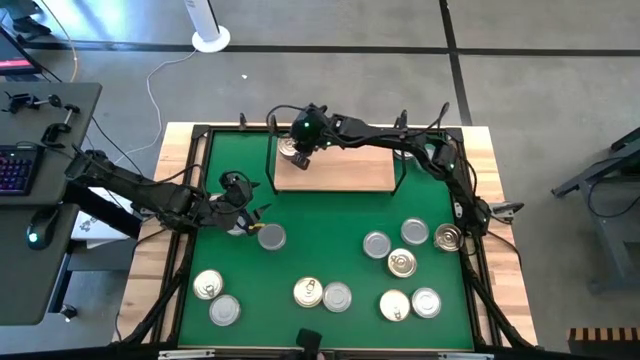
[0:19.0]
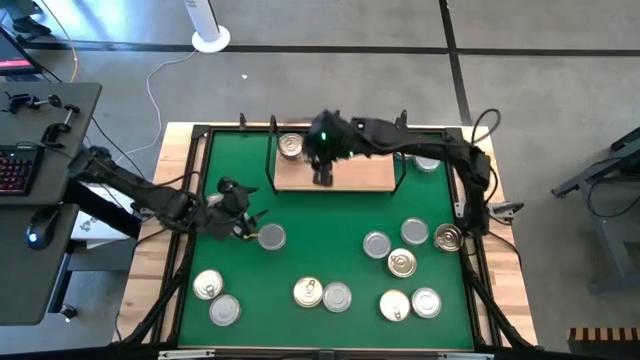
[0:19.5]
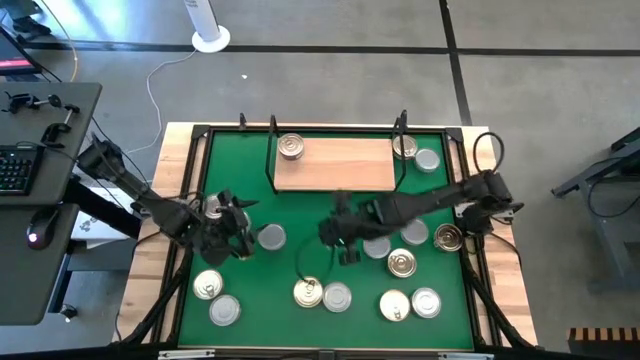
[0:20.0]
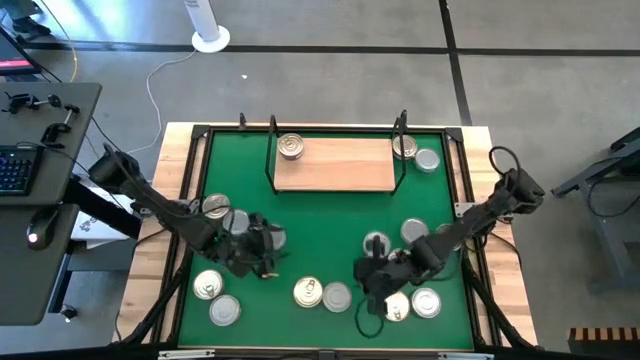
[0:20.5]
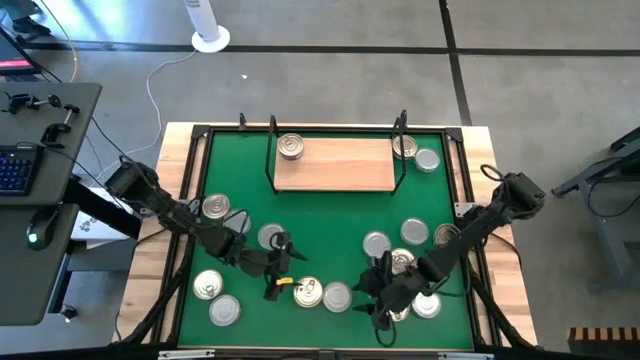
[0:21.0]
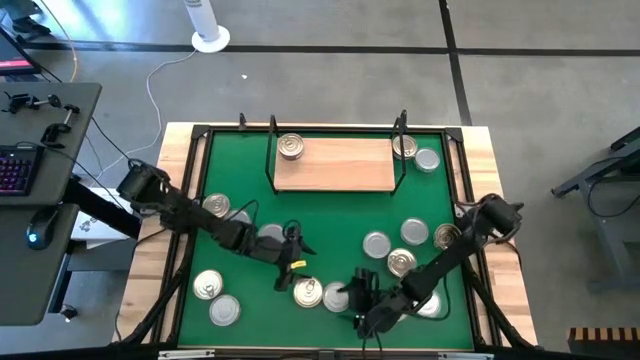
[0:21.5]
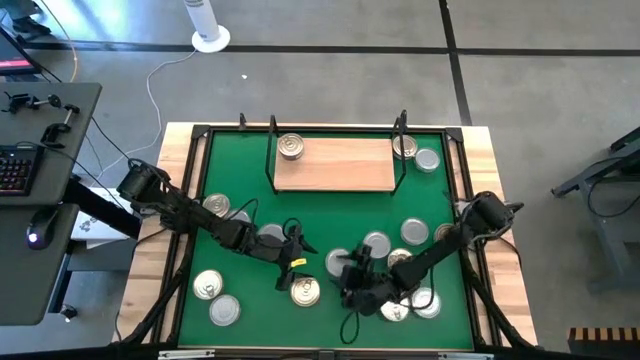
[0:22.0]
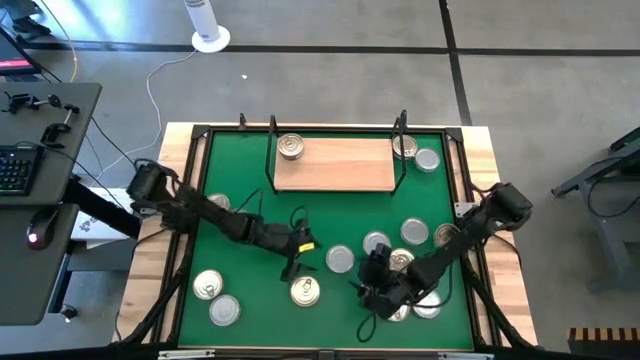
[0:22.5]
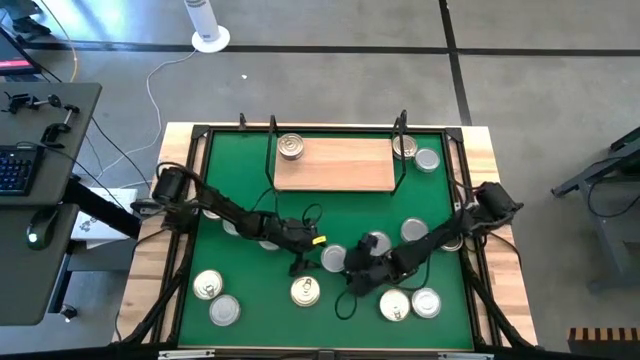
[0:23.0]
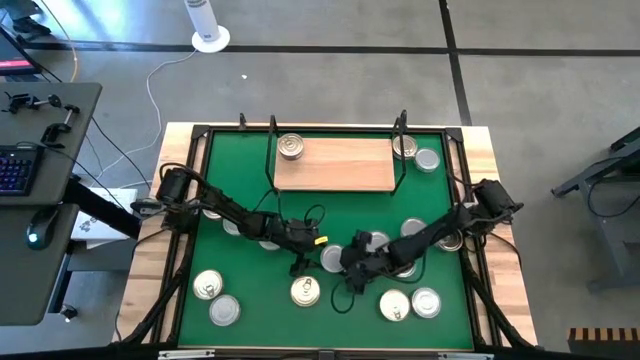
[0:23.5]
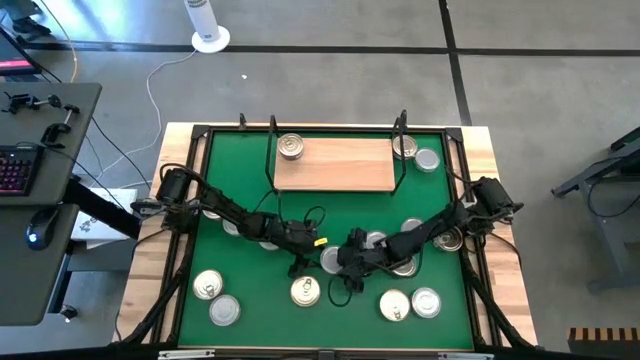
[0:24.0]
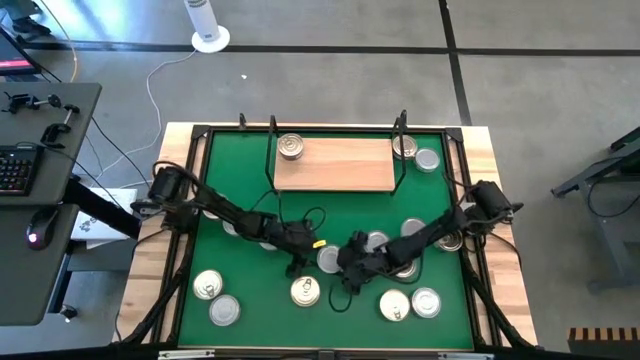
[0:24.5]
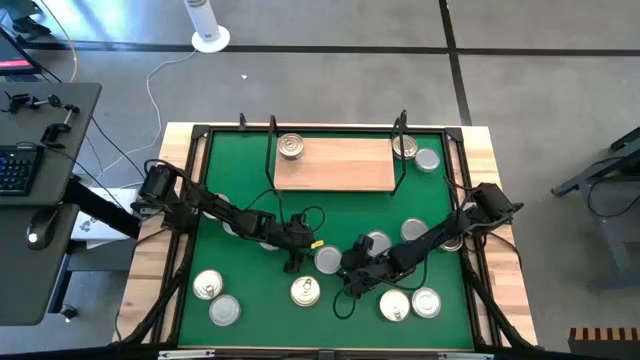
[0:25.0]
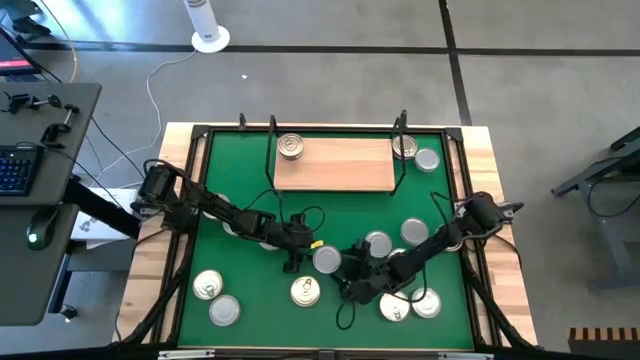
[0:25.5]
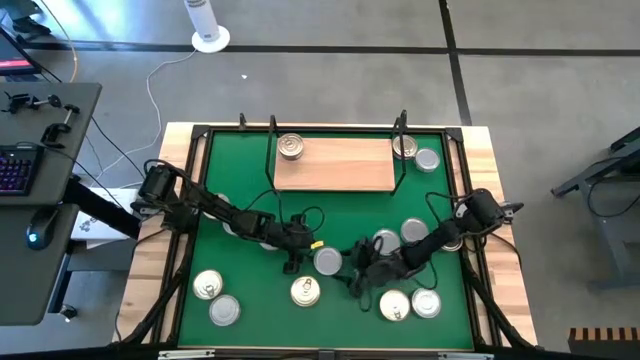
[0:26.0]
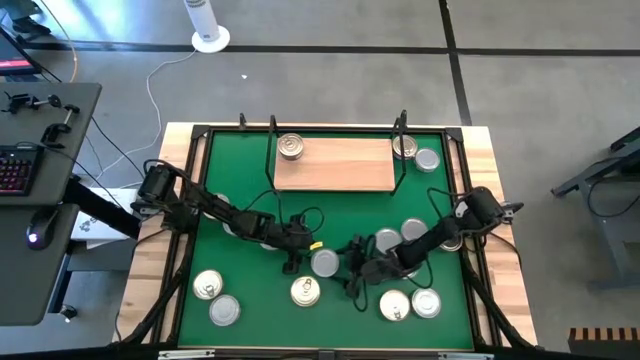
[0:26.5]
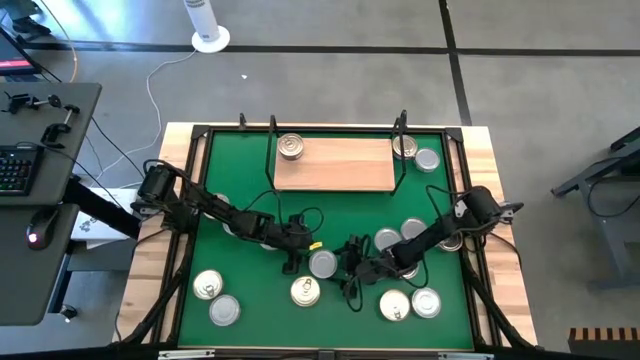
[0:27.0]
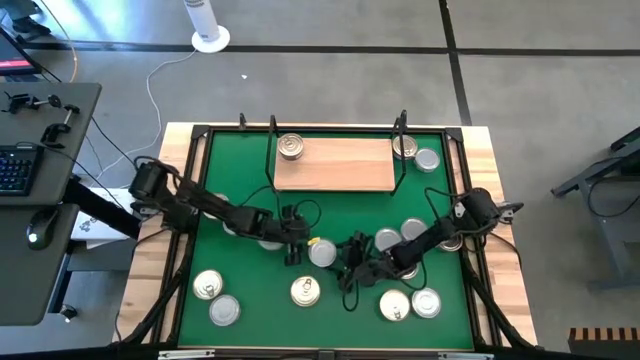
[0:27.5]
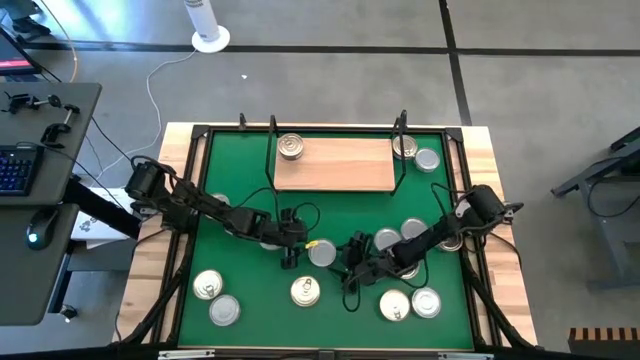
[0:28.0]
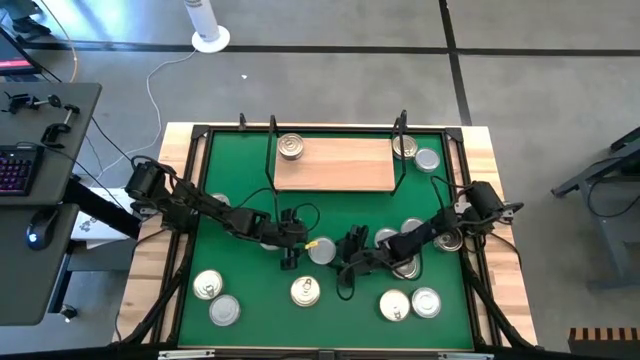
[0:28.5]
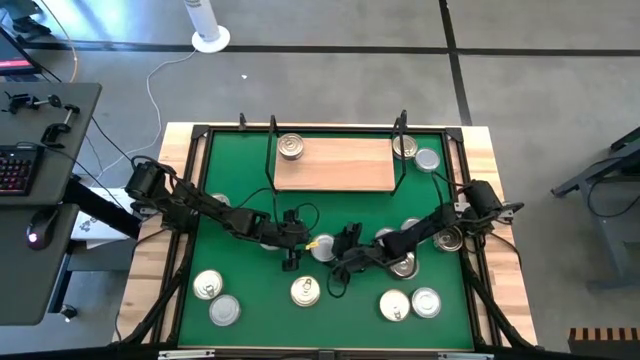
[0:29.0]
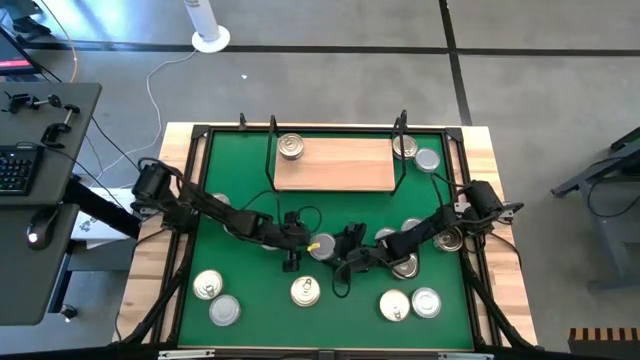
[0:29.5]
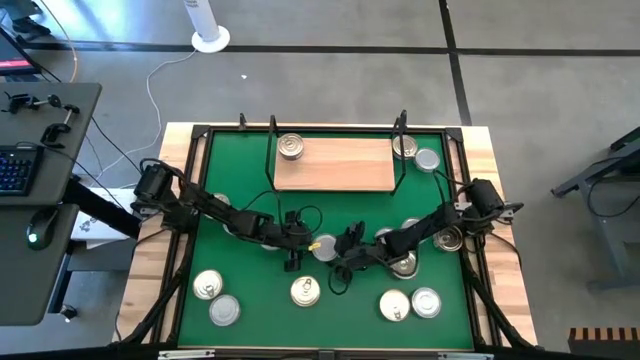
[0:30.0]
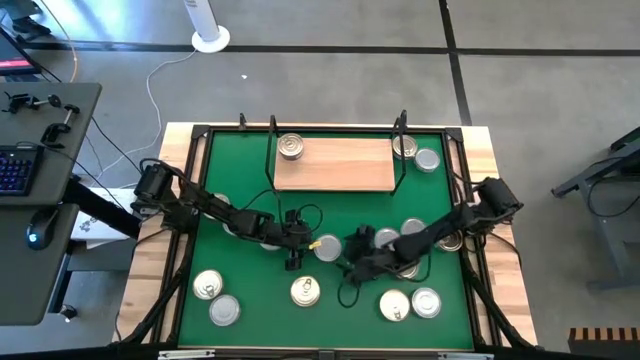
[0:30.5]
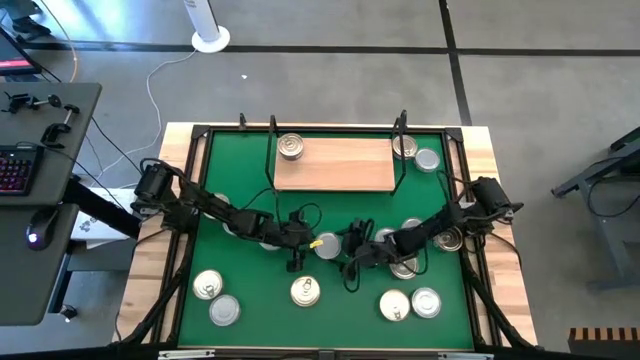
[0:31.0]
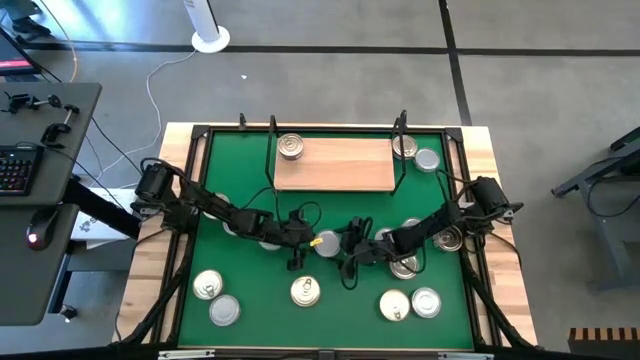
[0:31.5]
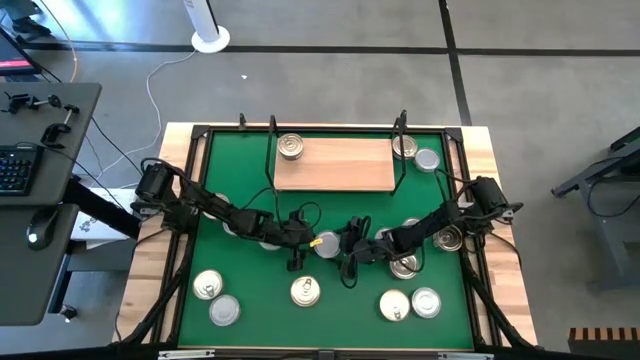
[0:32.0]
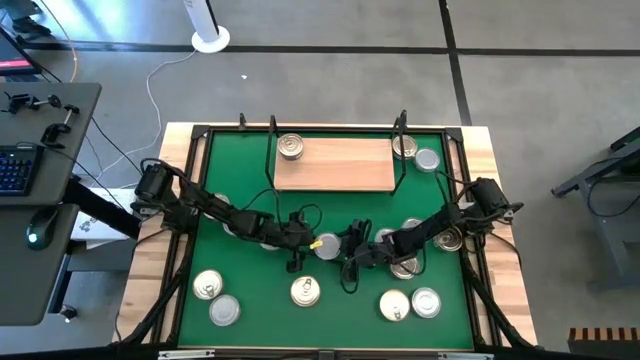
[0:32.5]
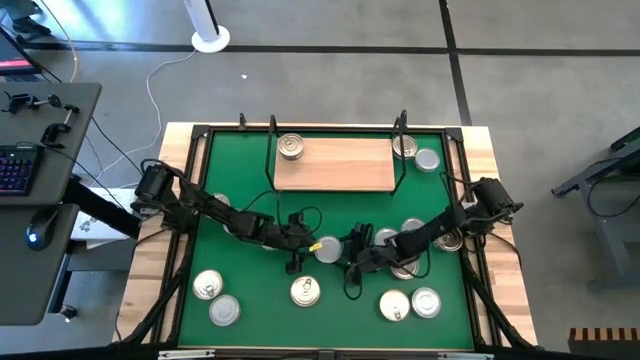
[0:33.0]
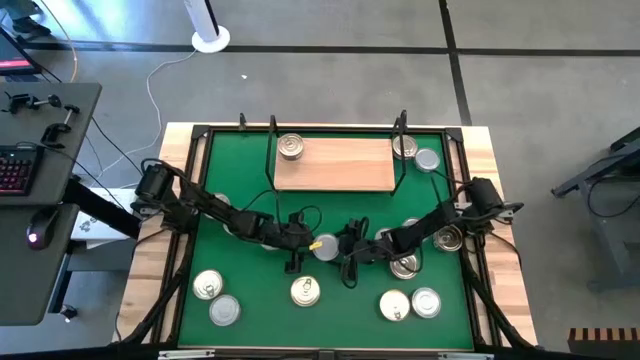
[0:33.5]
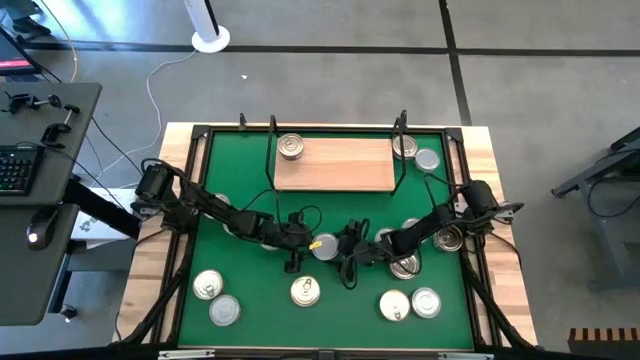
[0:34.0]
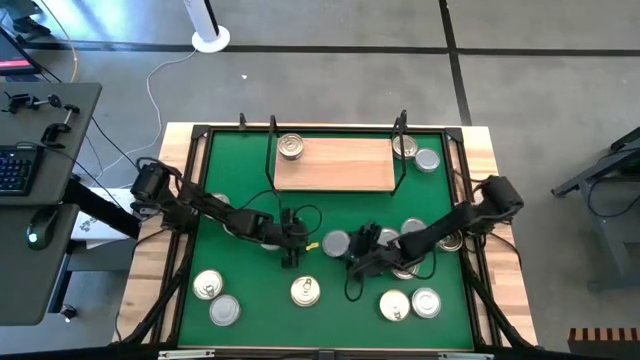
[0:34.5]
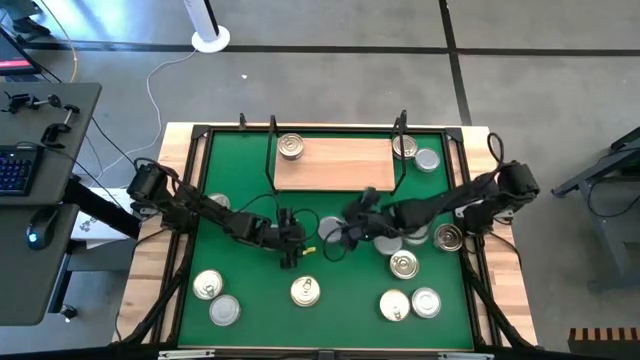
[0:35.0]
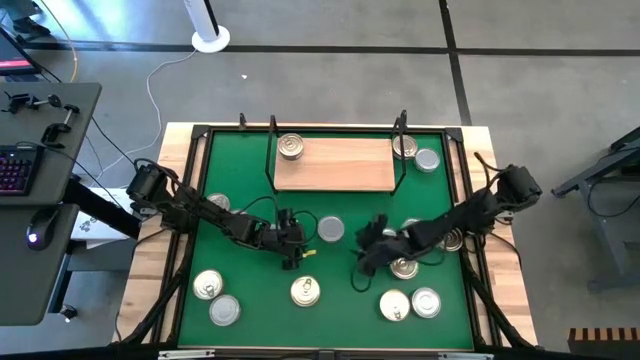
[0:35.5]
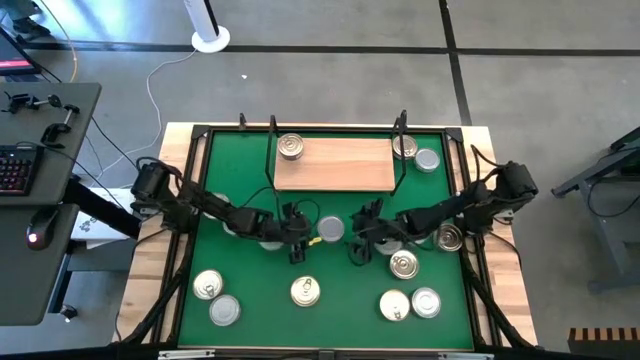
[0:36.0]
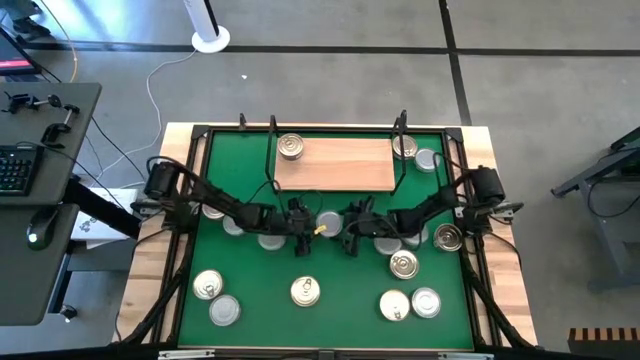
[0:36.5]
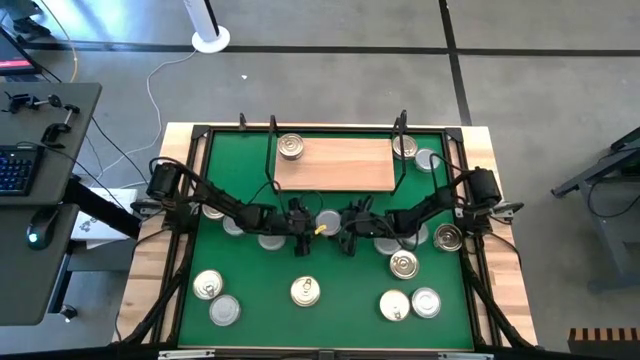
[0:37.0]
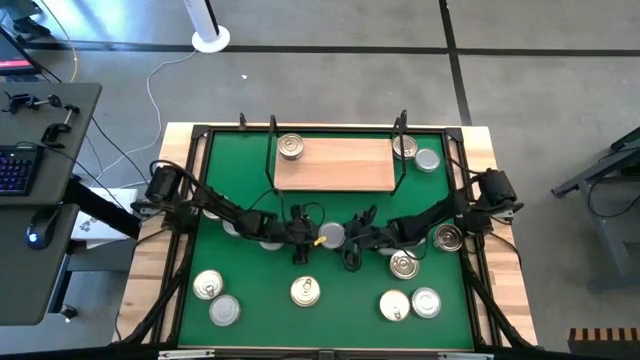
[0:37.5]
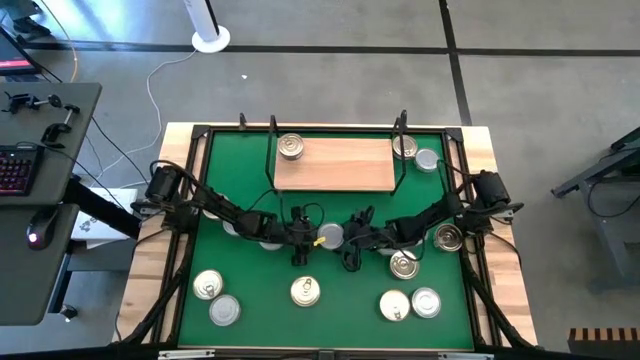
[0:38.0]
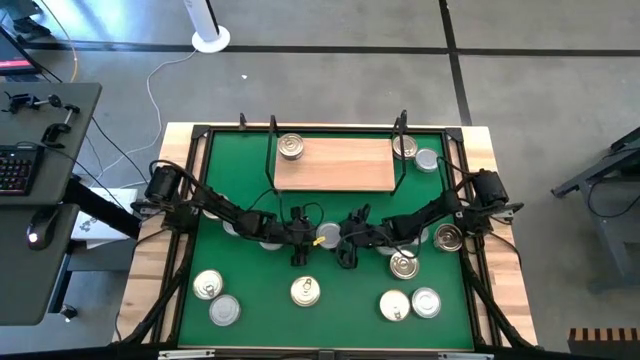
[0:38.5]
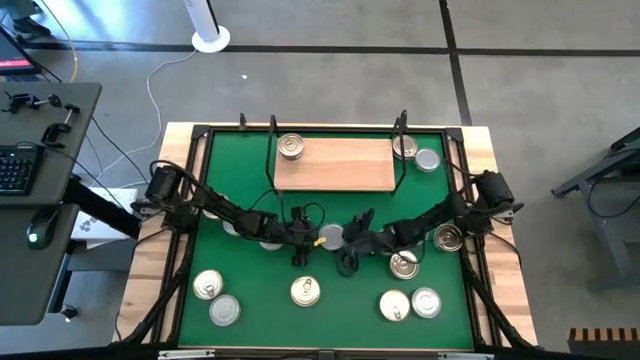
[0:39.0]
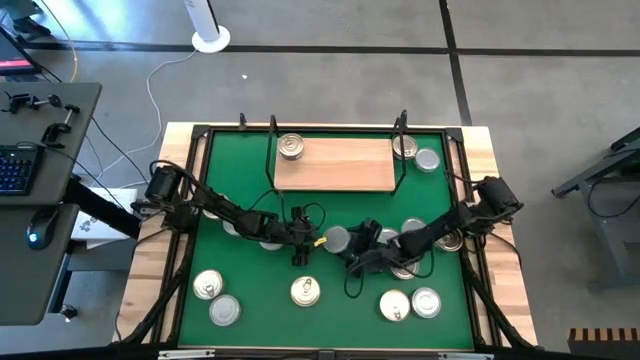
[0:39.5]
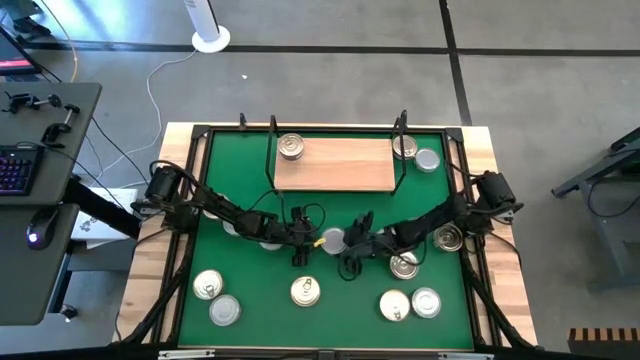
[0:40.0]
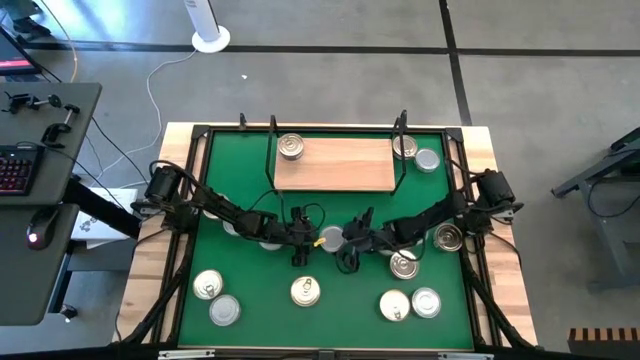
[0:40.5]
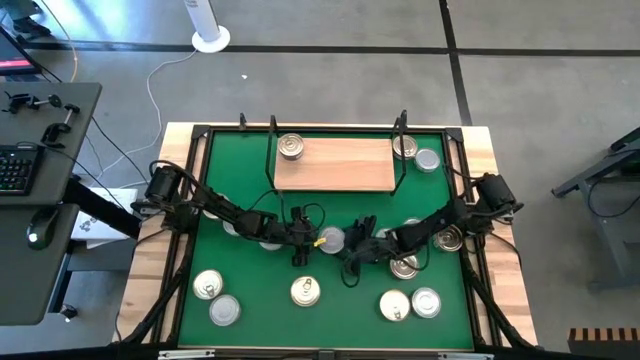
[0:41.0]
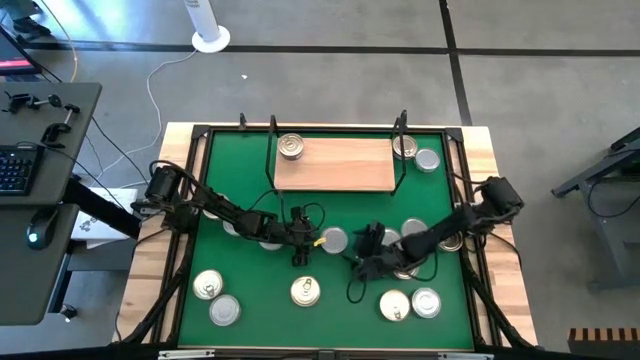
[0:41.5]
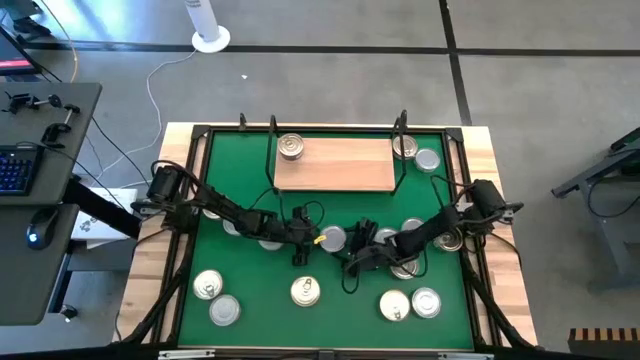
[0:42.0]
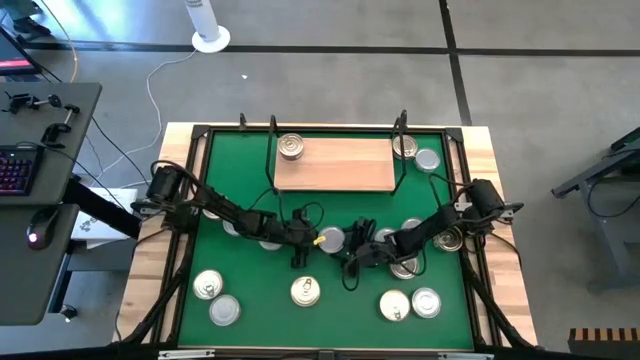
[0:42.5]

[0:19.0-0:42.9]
Task: Stack canned seafood by type on shelf
Put the green tuna can on the shelf
